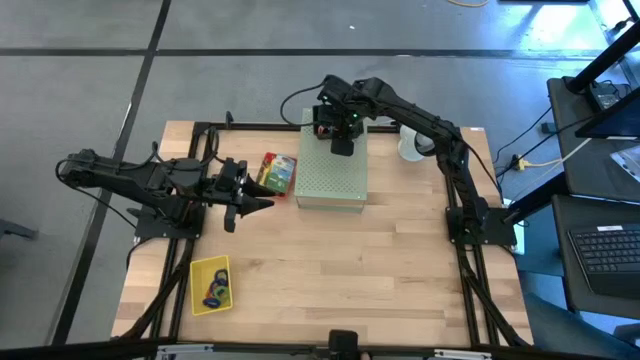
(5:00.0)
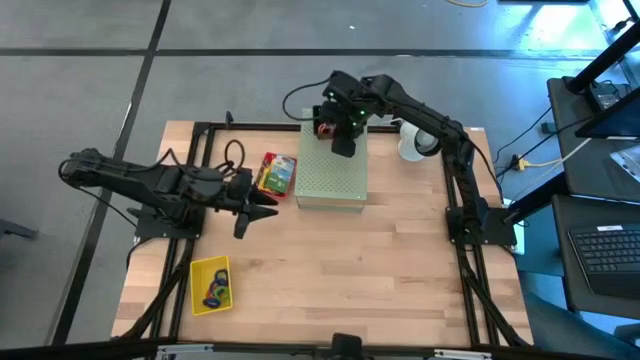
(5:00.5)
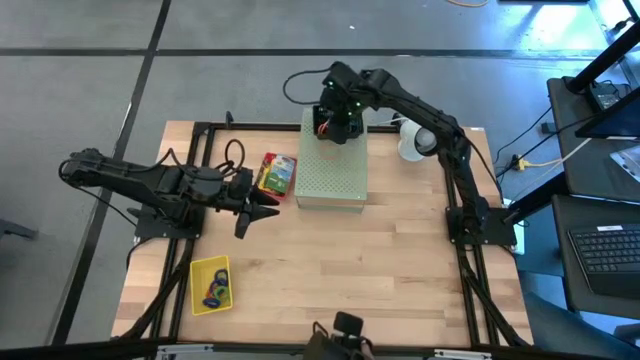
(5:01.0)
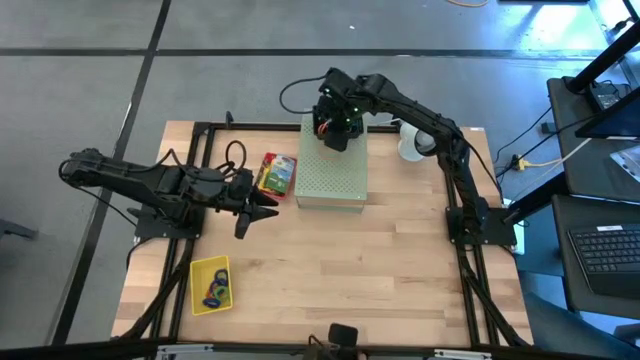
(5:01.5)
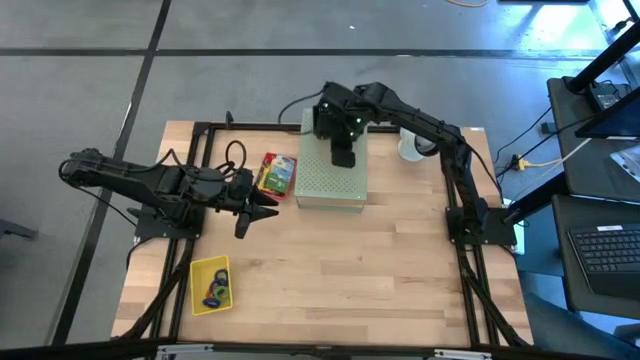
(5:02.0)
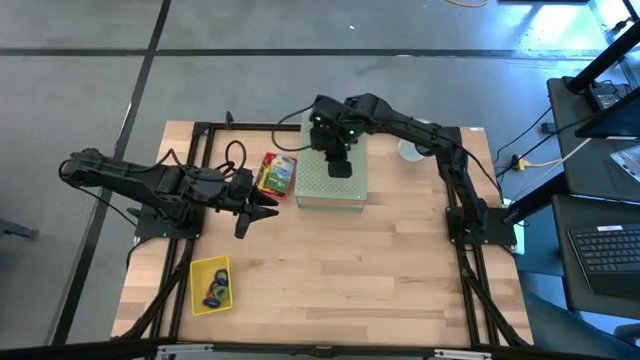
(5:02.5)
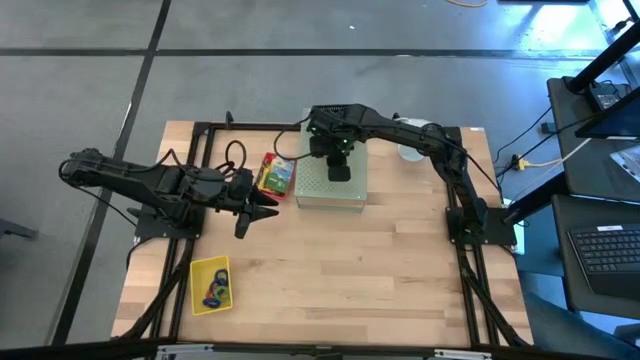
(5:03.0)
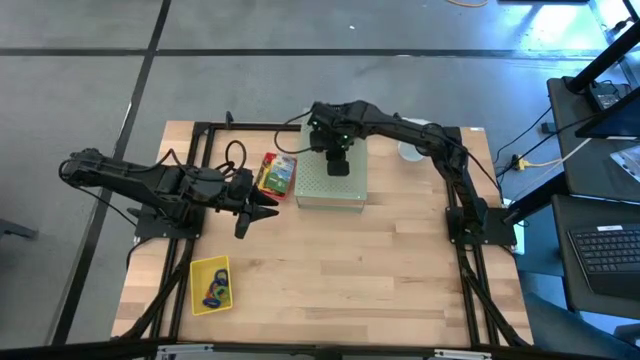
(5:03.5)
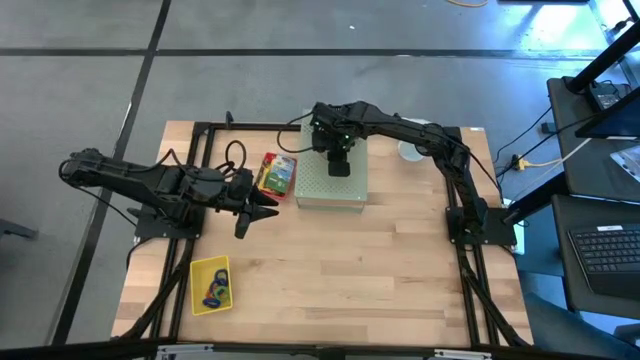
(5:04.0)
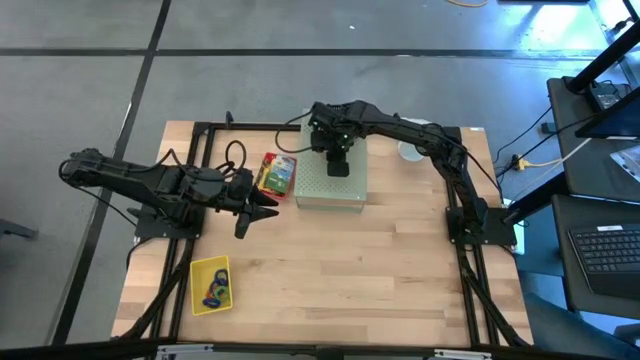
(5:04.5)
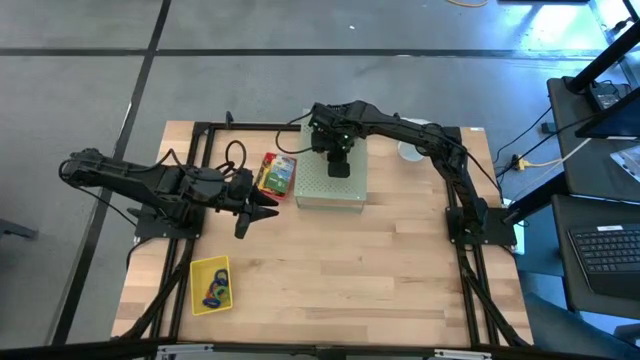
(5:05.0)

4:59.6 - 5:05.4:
Task: Pick & Place Office Desk Supplies
Put the orange rubber band into the black bin

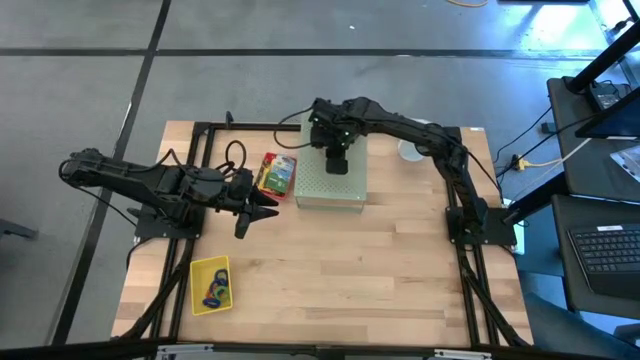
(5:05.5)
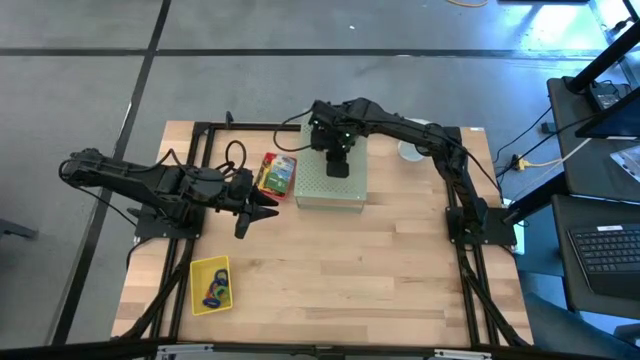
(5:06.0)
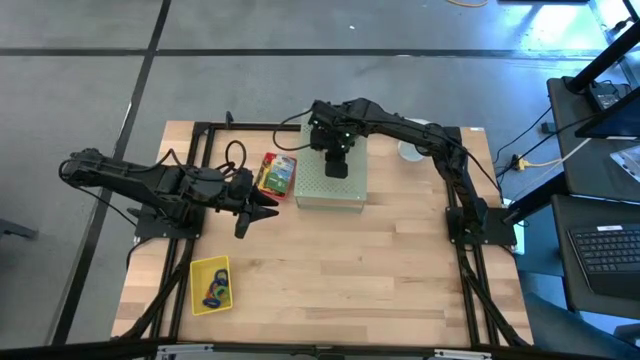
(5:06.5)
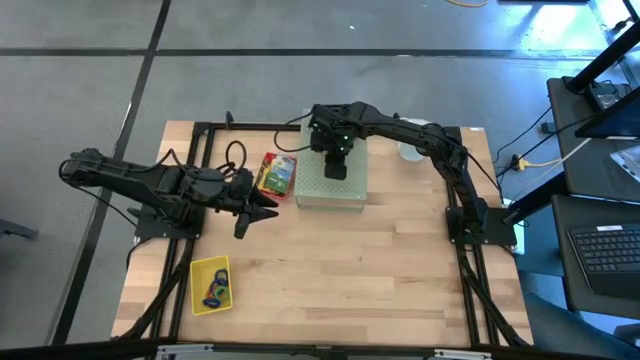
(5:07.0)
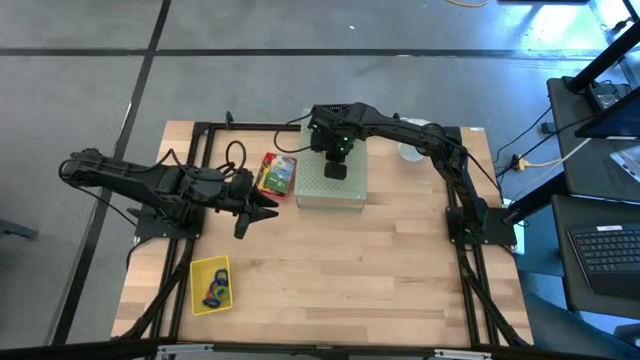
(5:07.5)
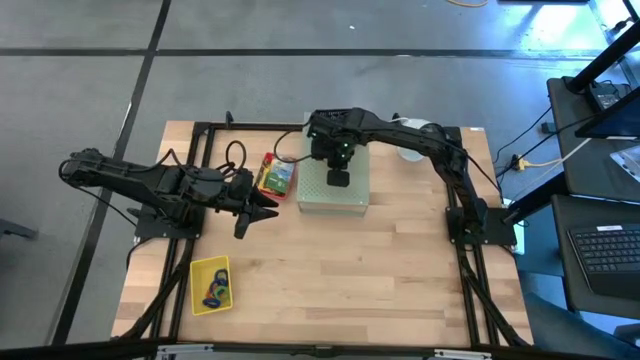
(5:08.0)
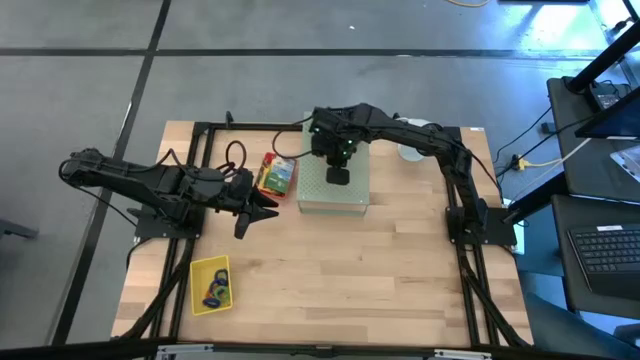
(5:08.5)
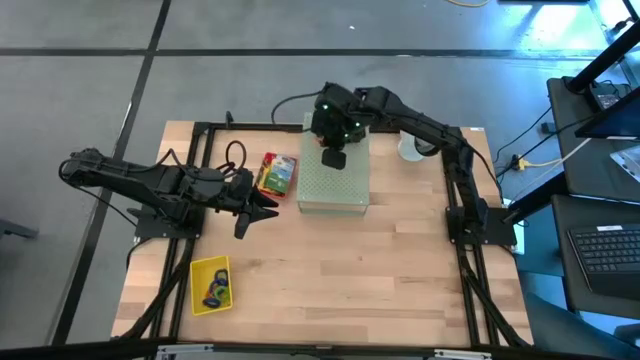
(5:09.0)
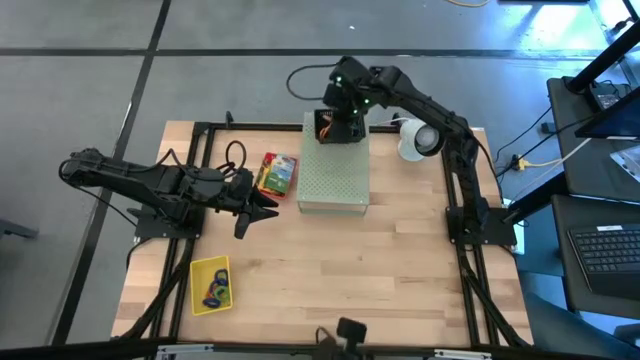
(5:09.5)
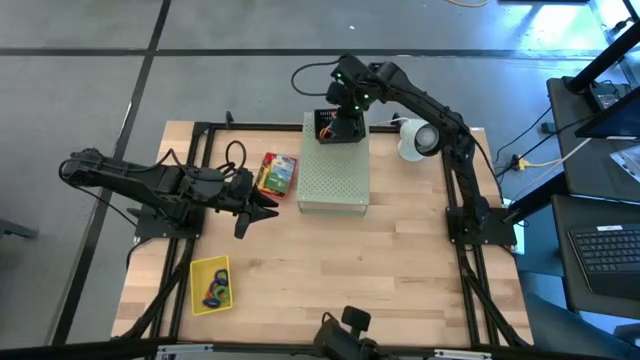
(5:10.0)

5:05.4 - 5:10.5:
Put the orange rubber band into the black bin
